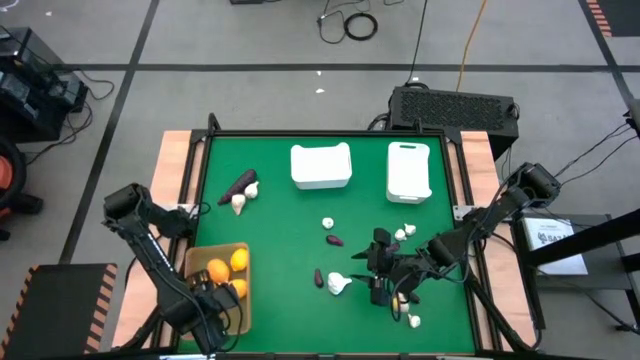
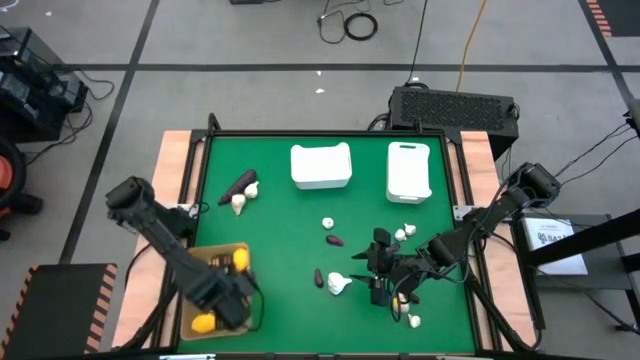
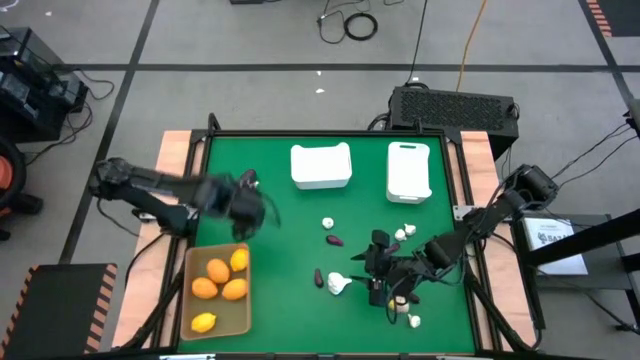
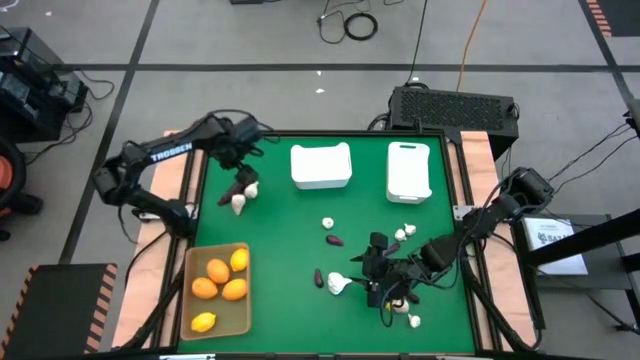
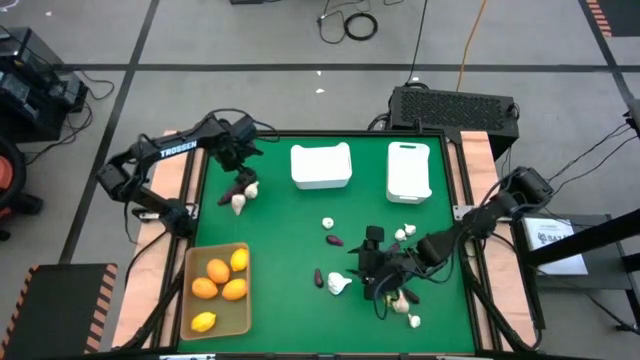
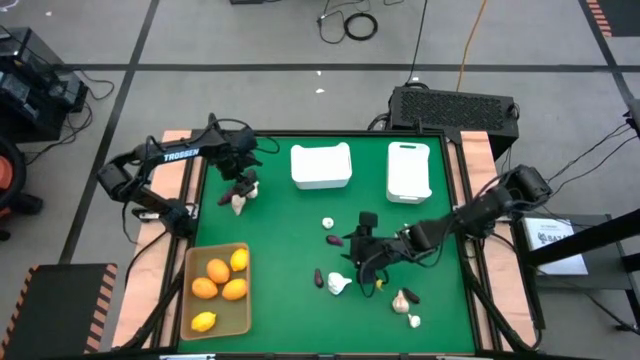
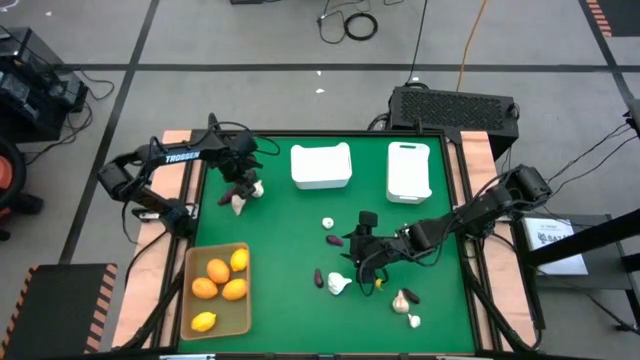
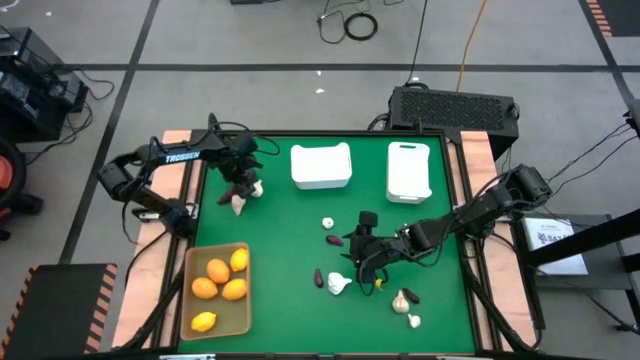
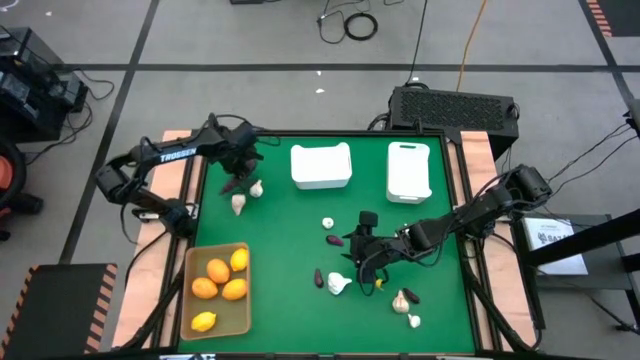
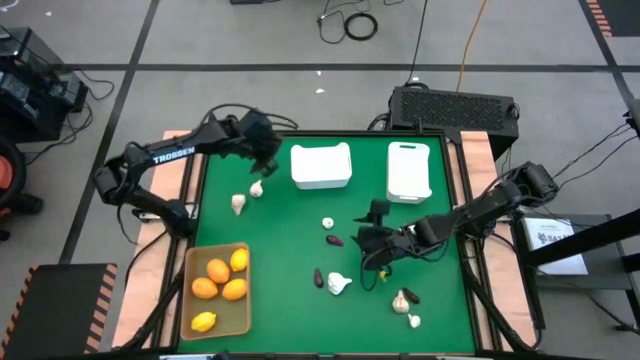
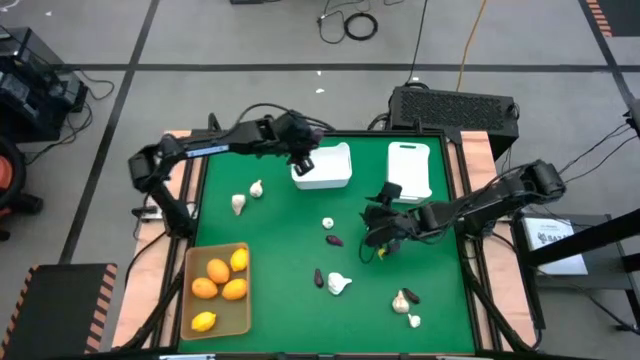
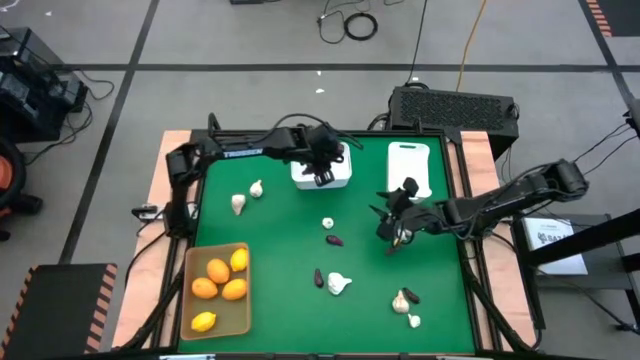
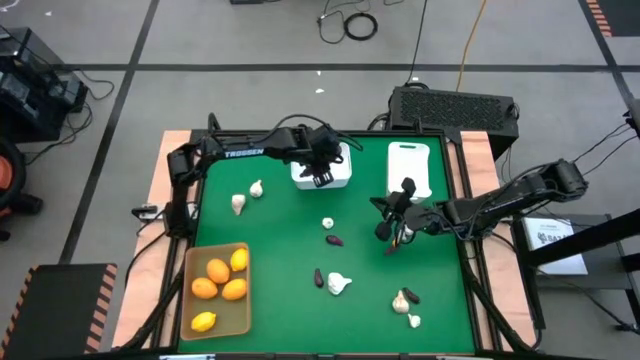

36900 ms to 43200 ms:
Task: Sort produce into baskets
Put the violet eggplant into the left white bin

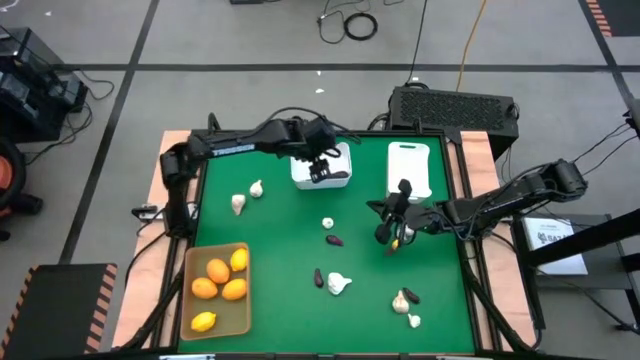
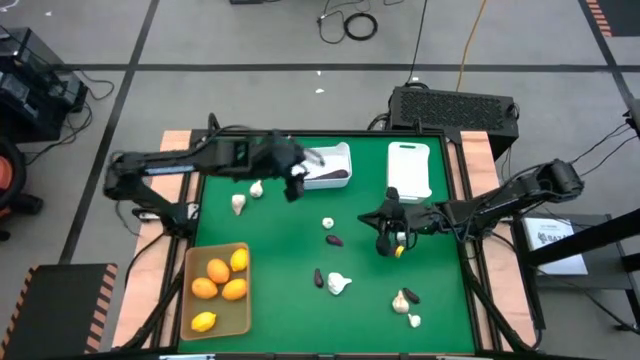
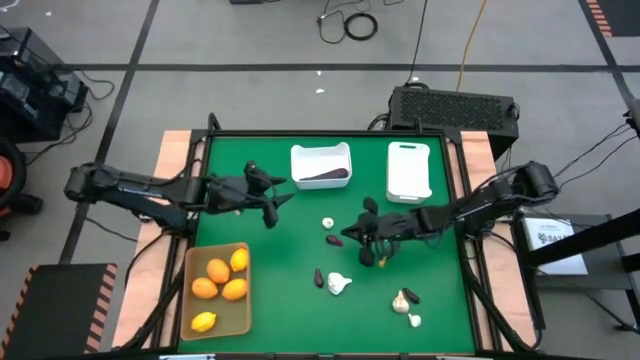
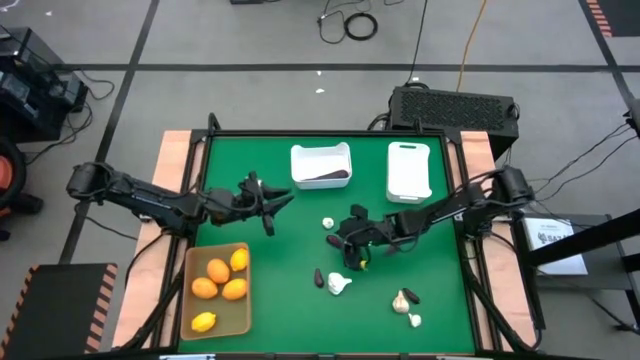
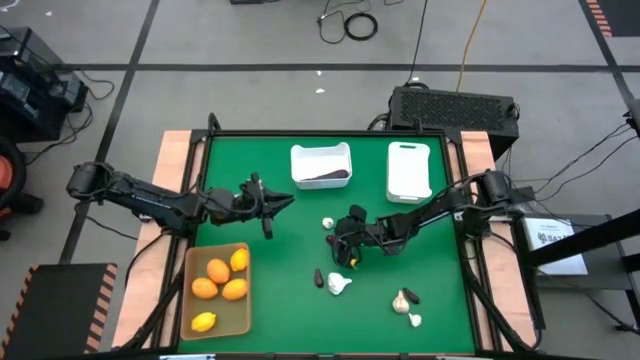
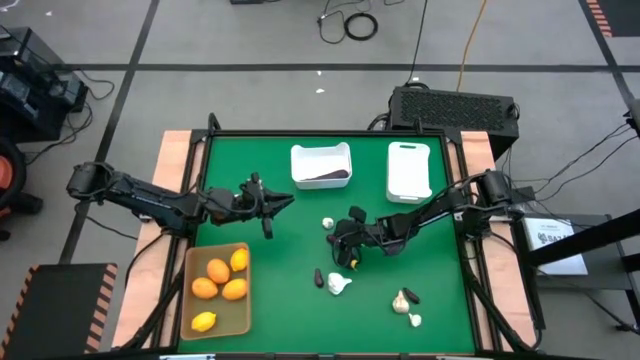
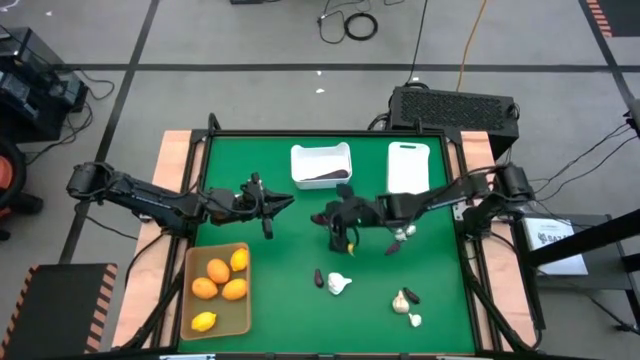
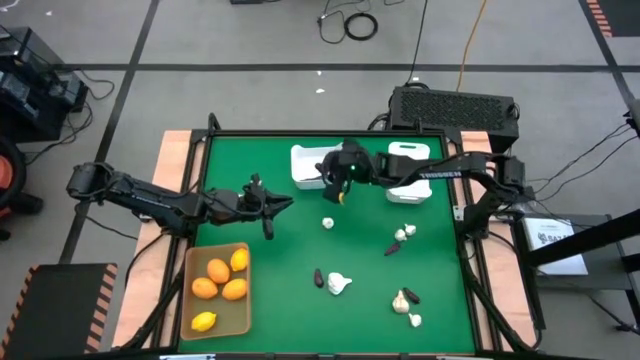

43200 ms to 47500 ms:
Put the violet eggplant into the left white bin

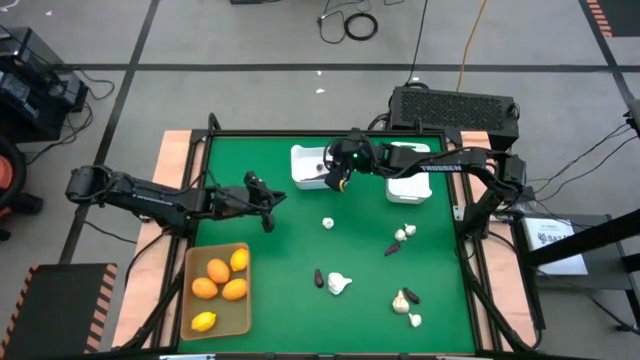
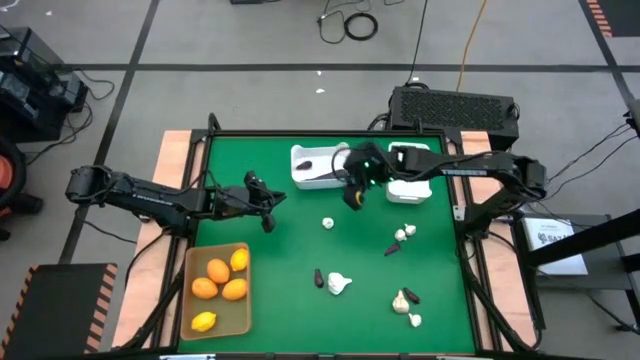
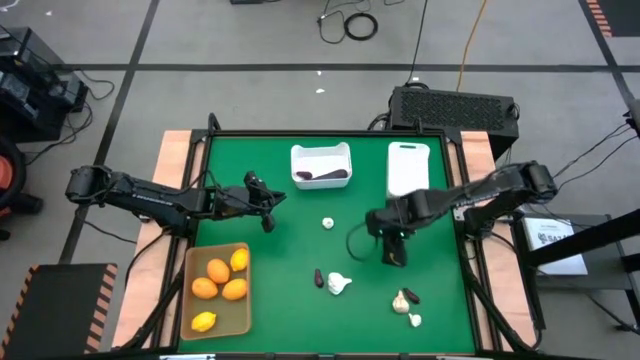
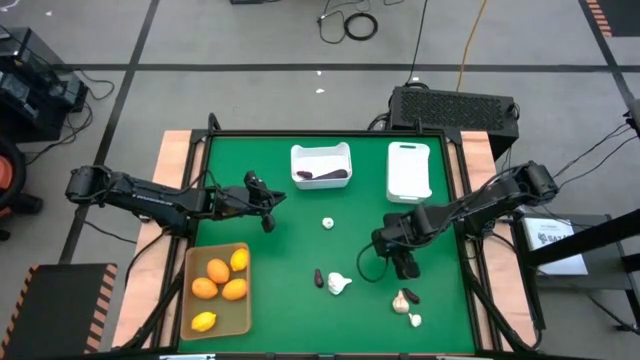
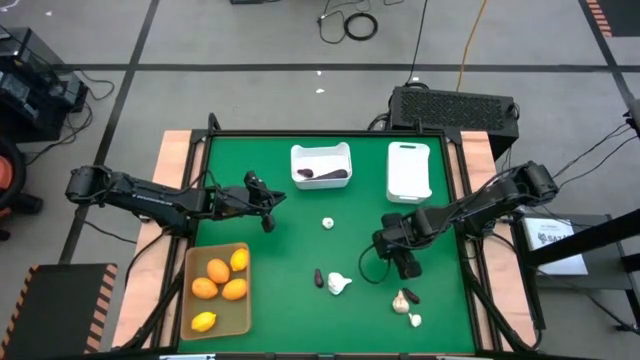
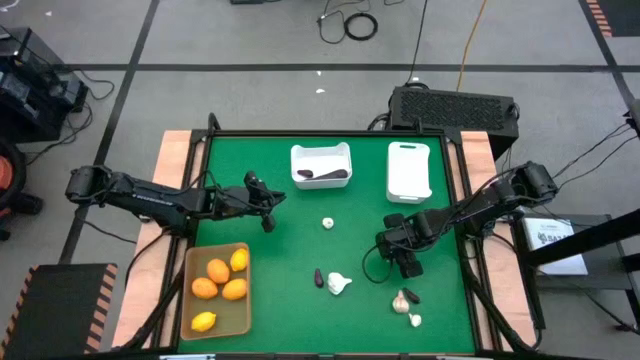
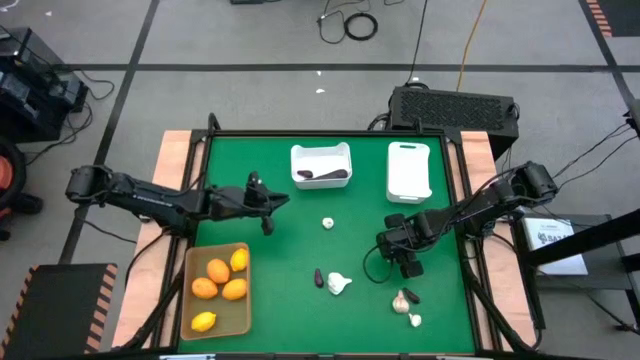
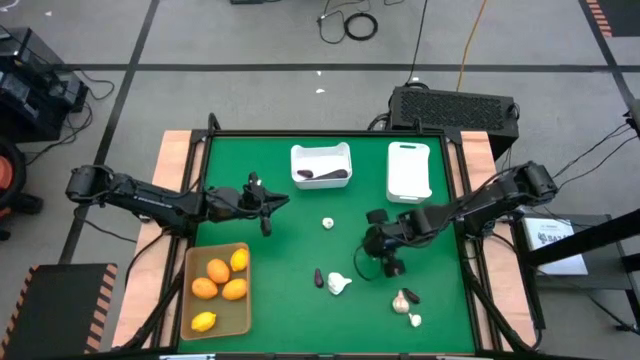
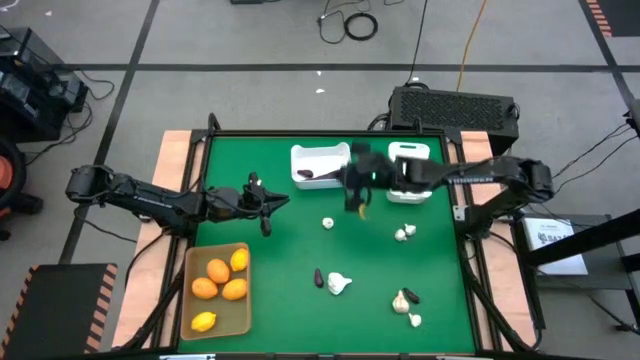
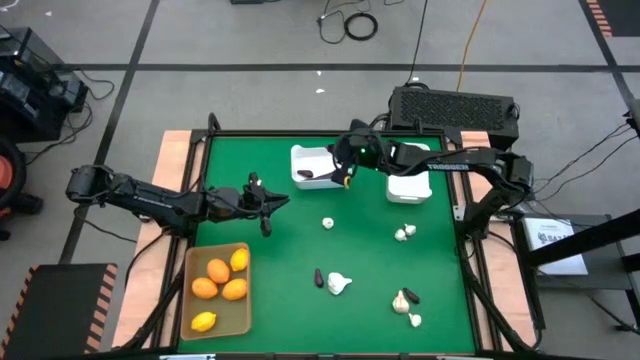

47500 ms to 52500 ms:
Put the violet eggplant into the left white bin

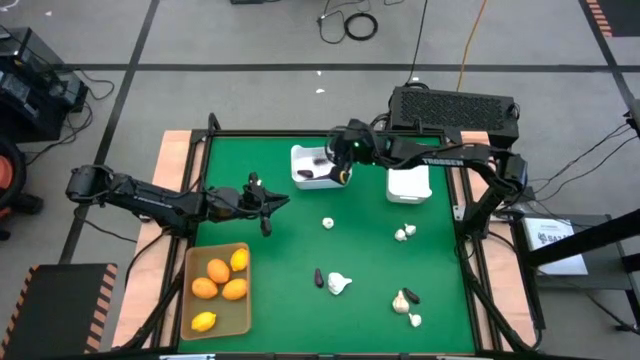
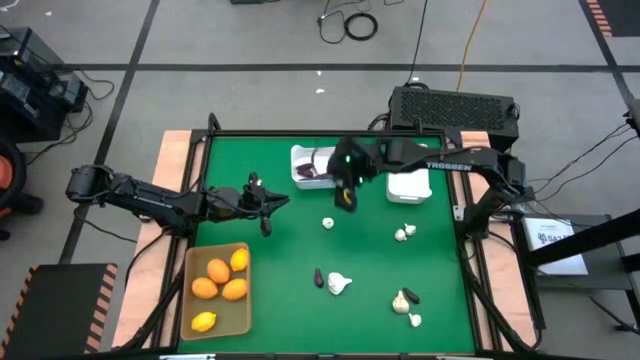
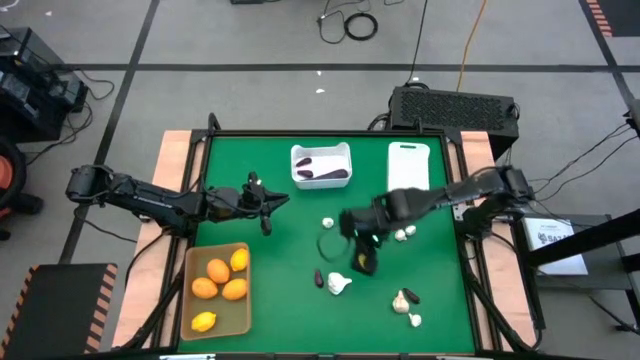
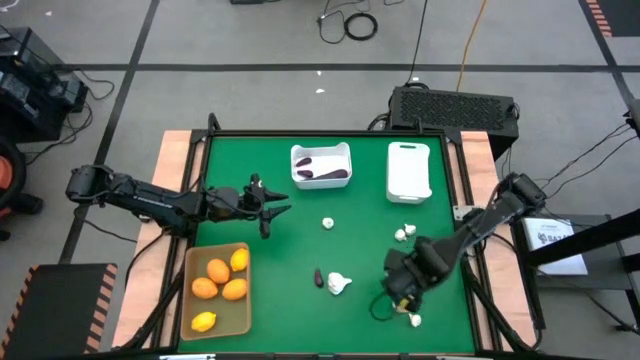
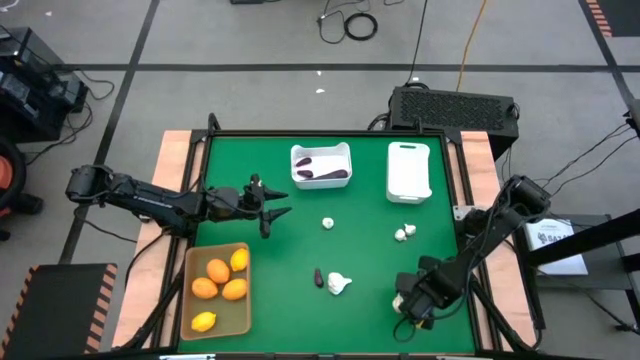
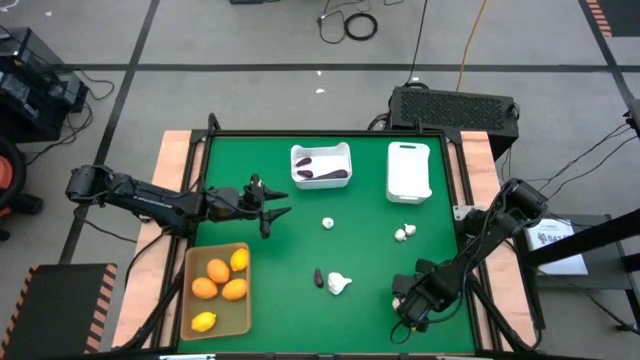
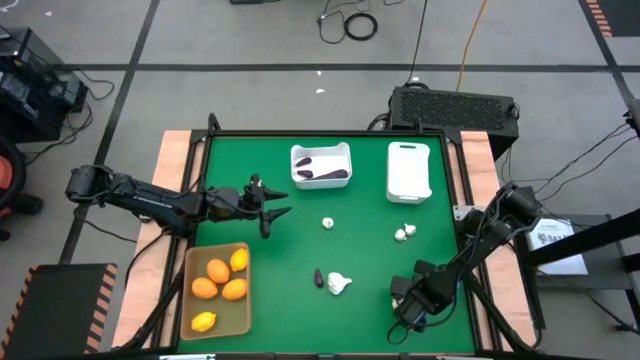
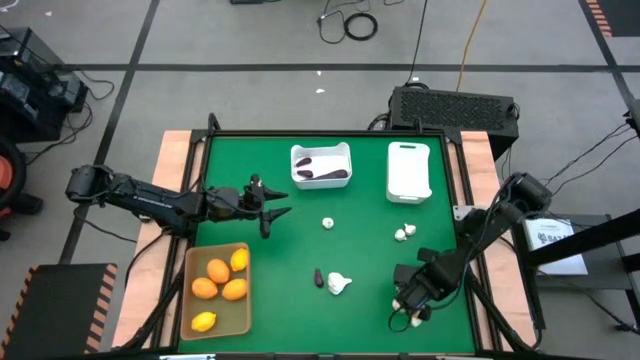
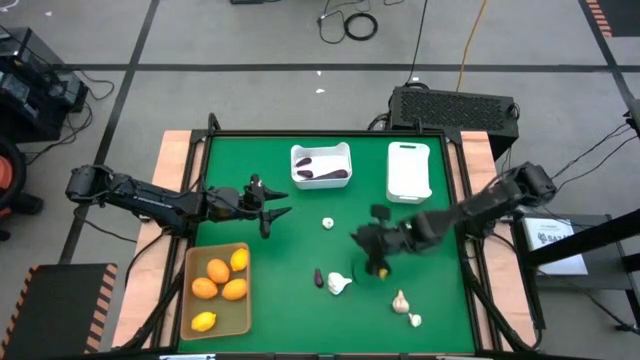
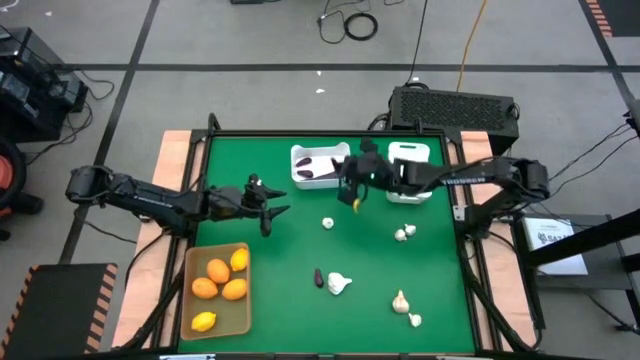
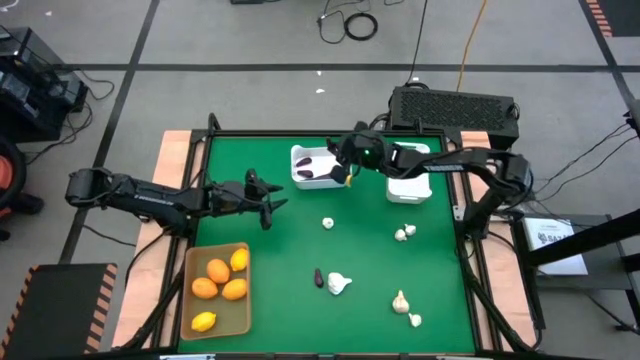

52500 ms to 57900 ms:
Put the violet eggplant into the left white bin
